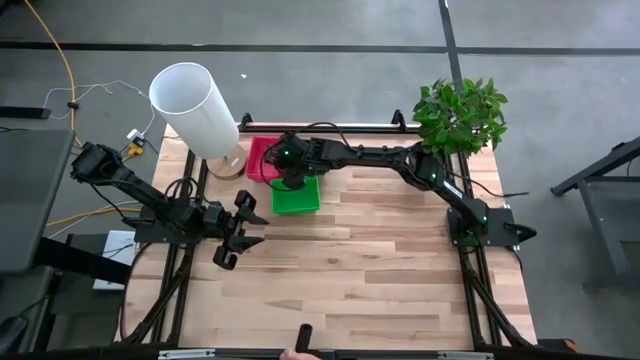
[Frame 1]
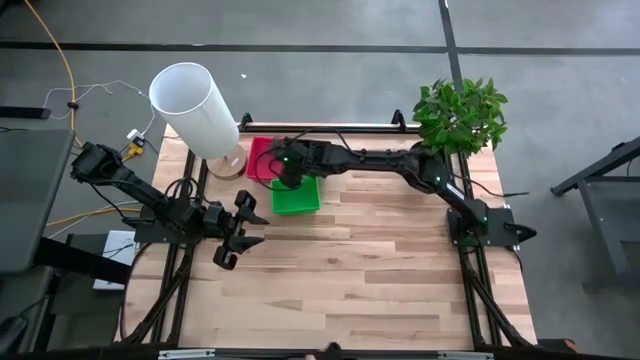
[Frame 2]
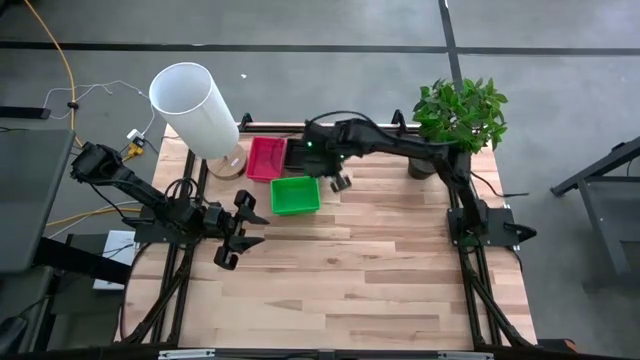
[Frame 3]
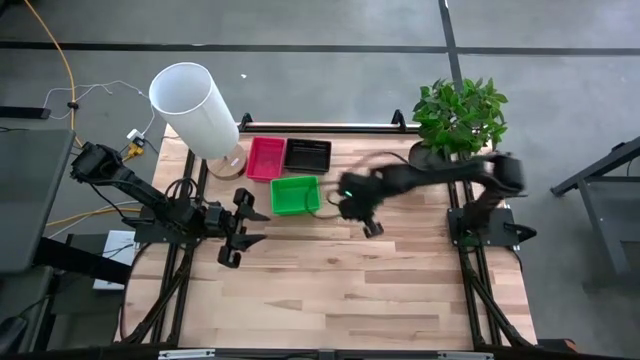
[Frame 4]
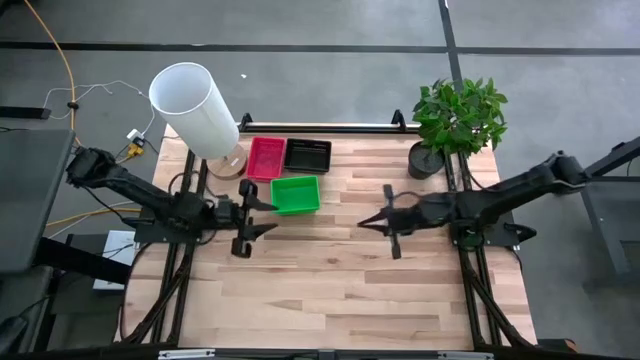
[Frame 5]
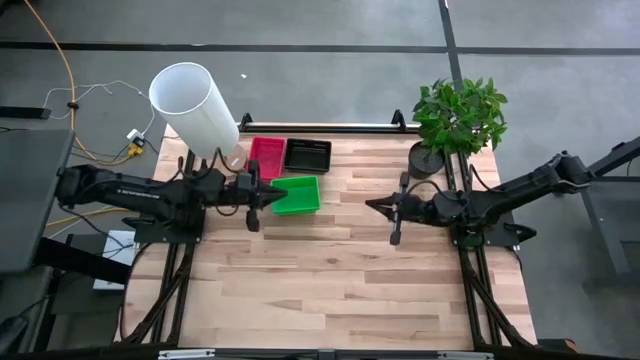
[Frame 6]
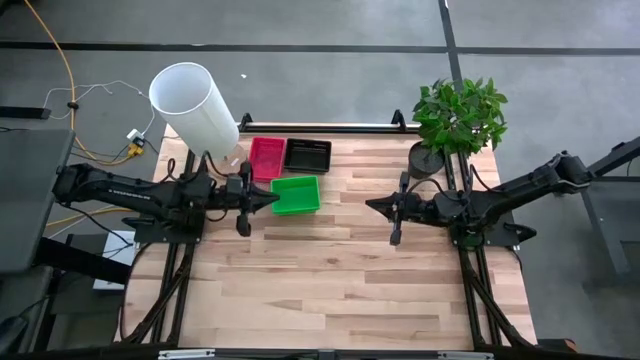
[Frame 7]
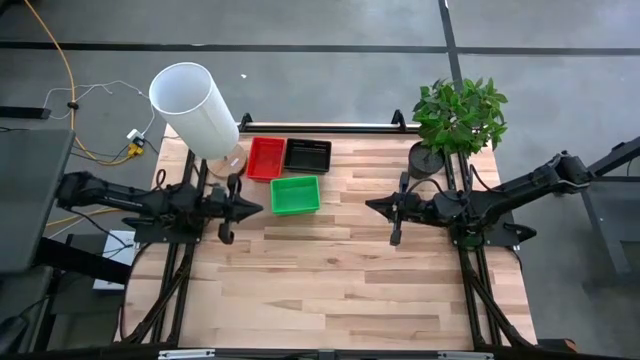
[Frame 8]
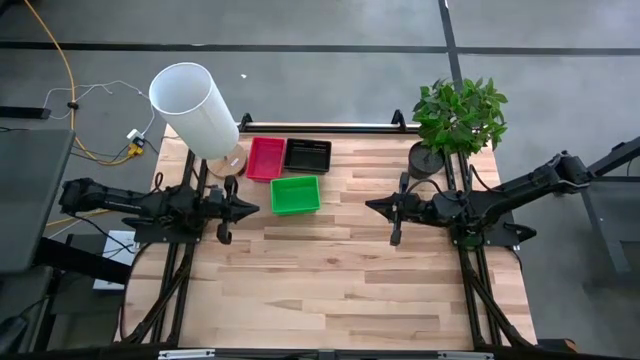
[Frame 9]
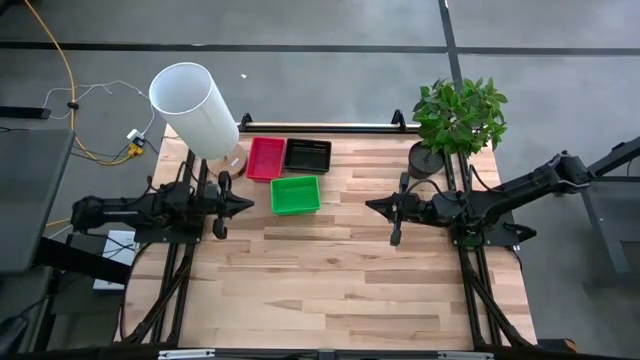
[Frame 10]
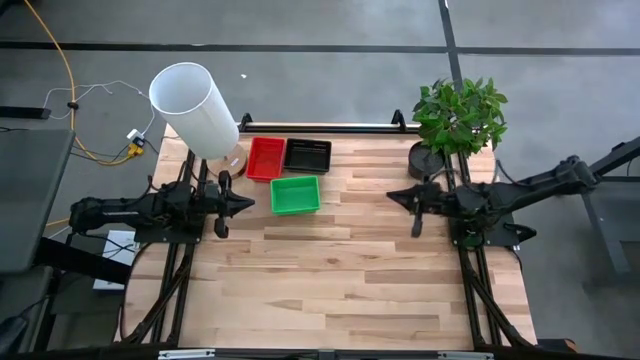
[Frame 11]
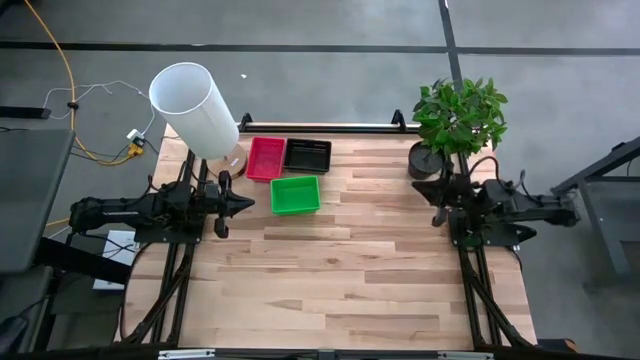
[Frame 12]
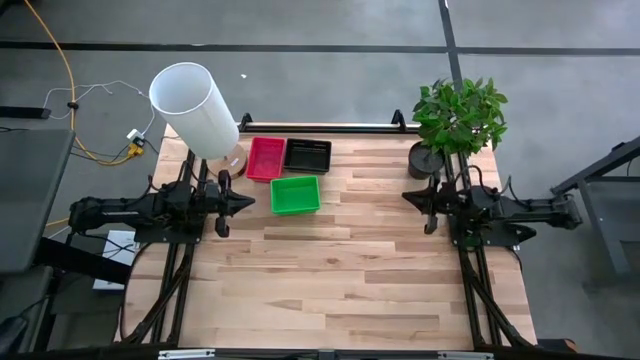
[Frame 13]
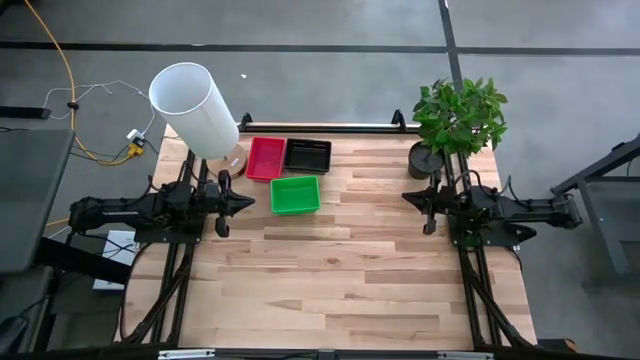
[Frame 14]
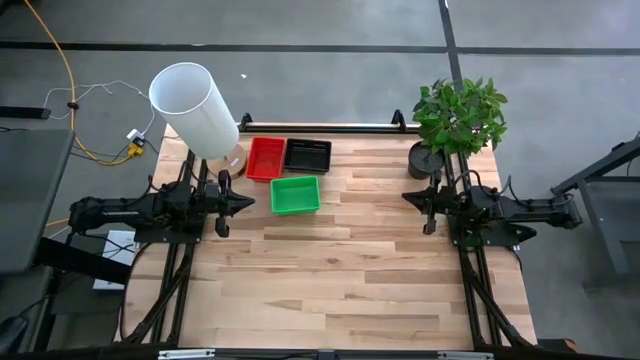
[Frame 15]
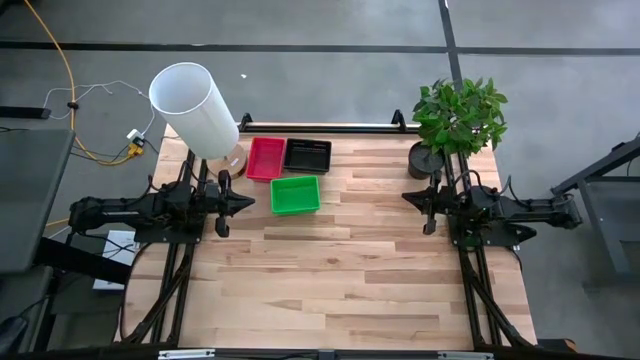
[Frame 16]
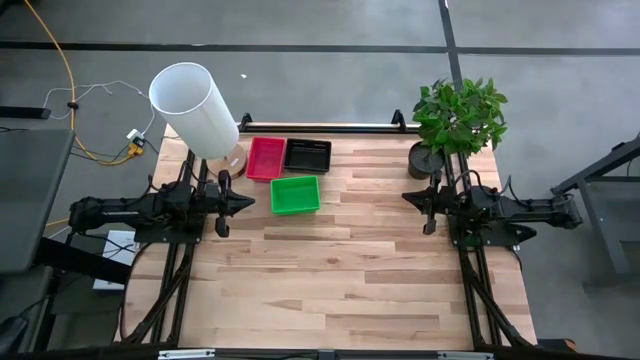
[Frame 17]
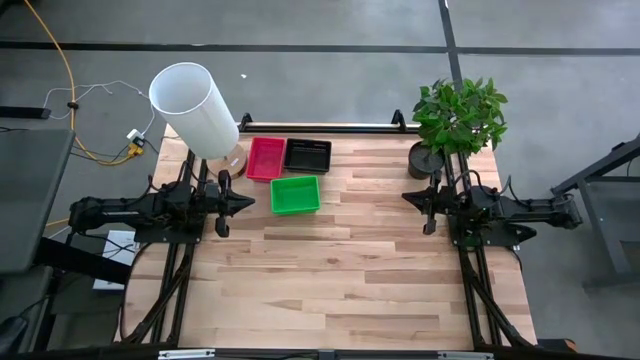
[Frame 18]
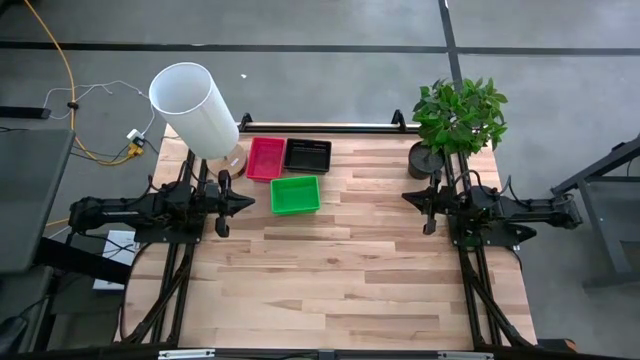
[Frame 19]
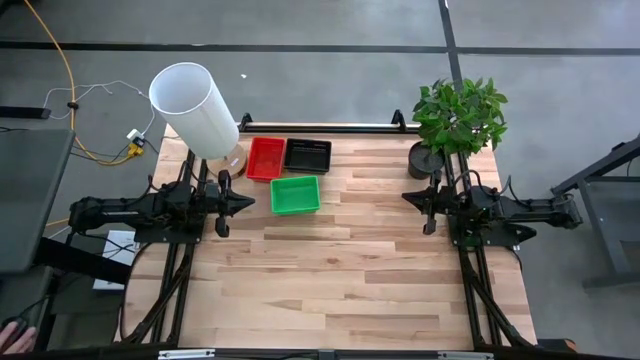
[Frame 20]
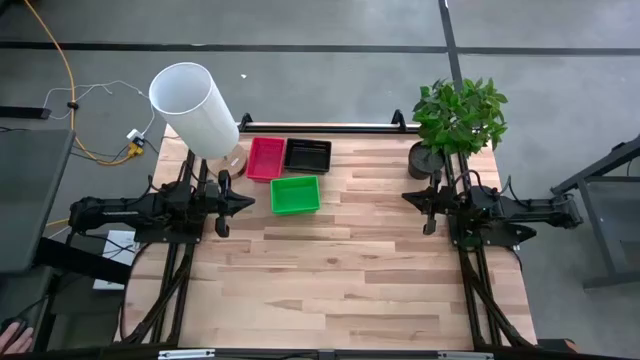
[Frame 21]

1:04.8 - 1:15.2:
Return to Home Position

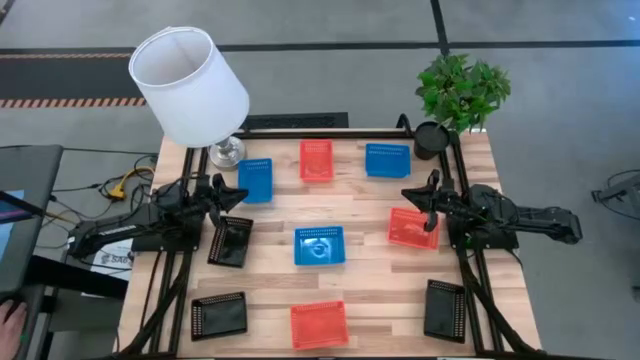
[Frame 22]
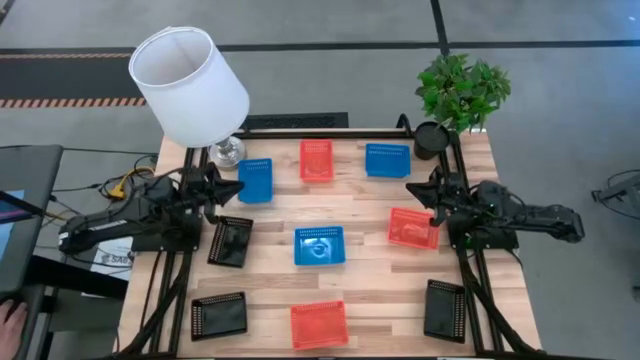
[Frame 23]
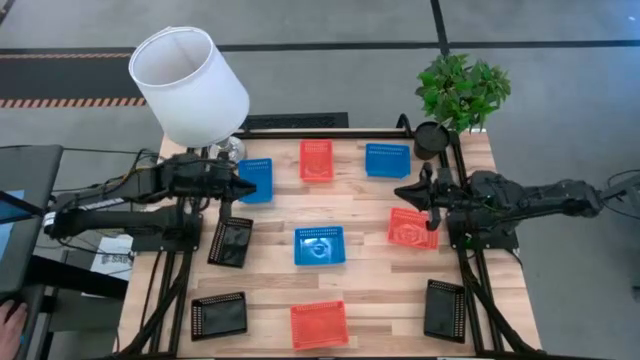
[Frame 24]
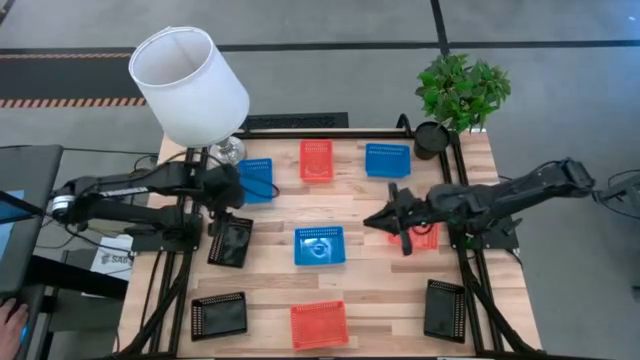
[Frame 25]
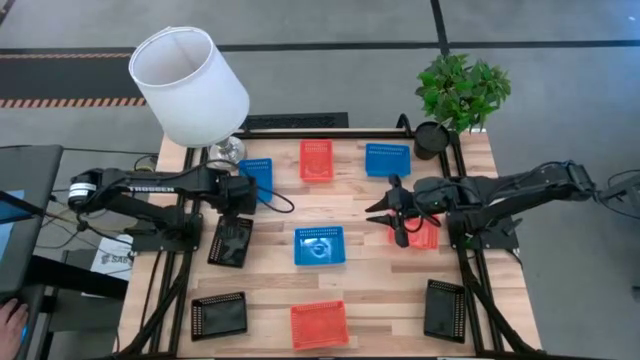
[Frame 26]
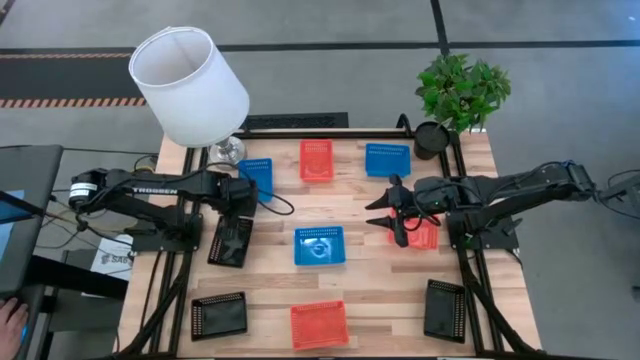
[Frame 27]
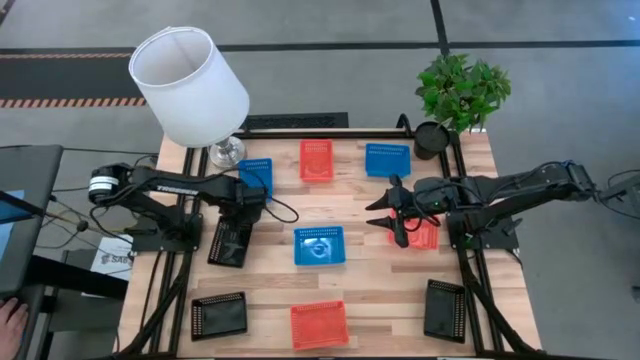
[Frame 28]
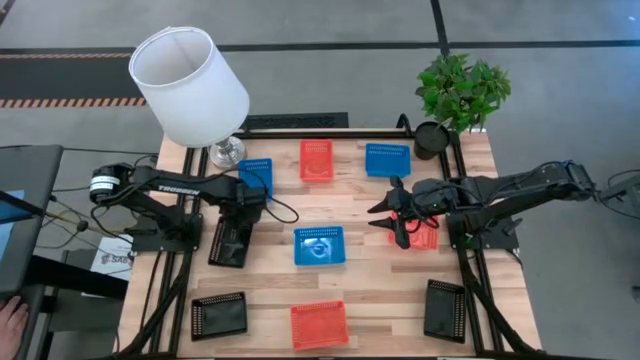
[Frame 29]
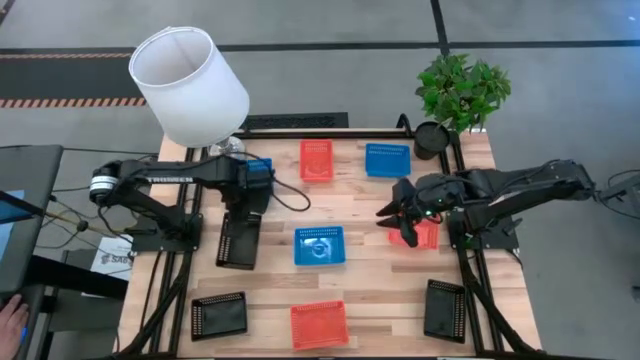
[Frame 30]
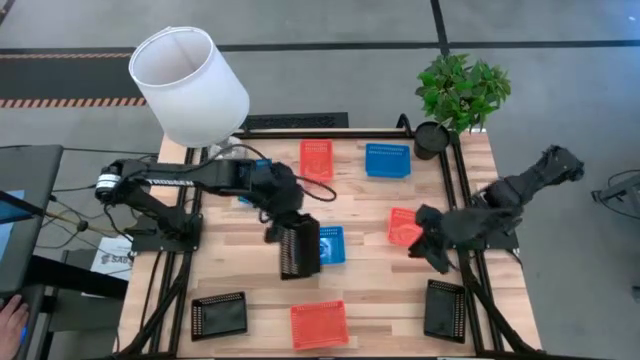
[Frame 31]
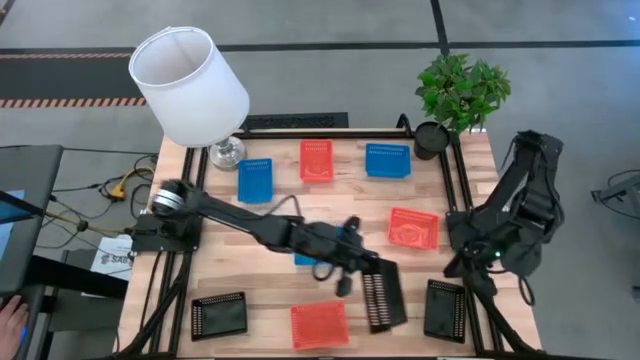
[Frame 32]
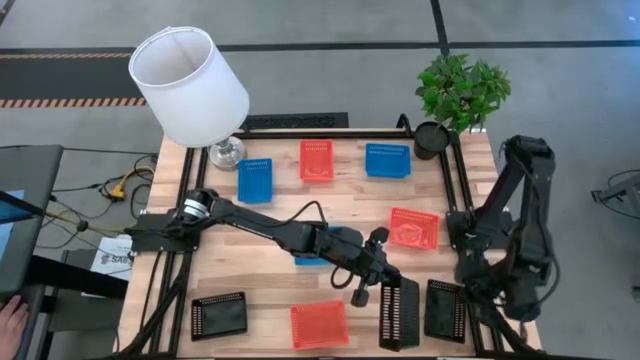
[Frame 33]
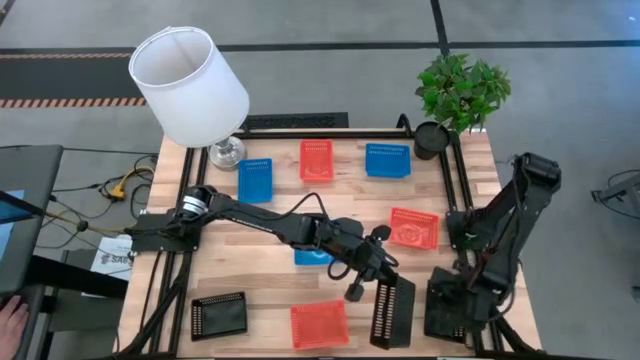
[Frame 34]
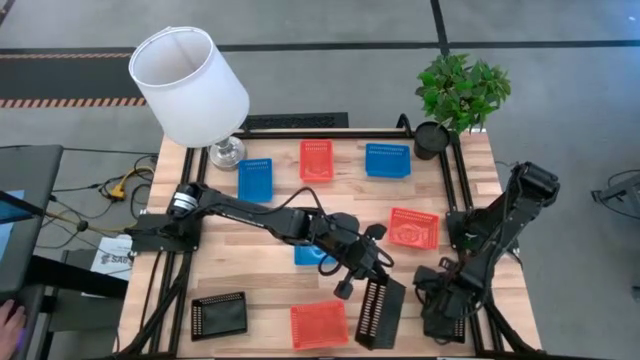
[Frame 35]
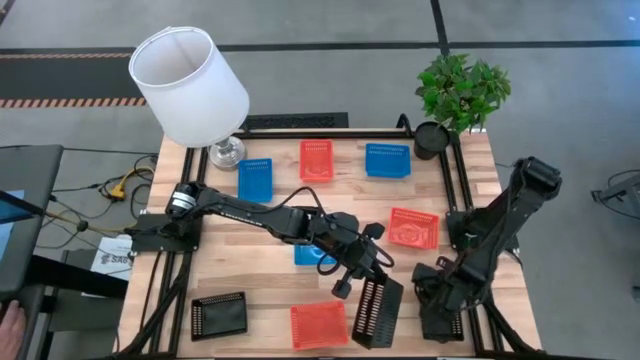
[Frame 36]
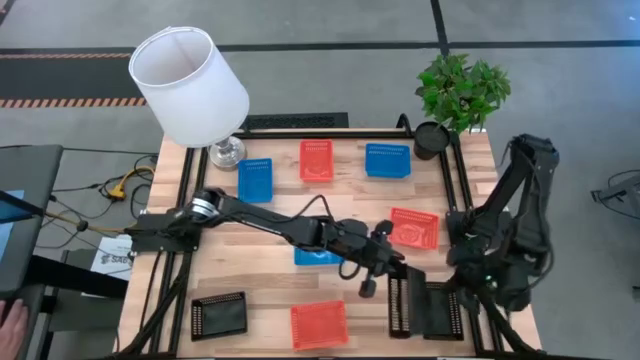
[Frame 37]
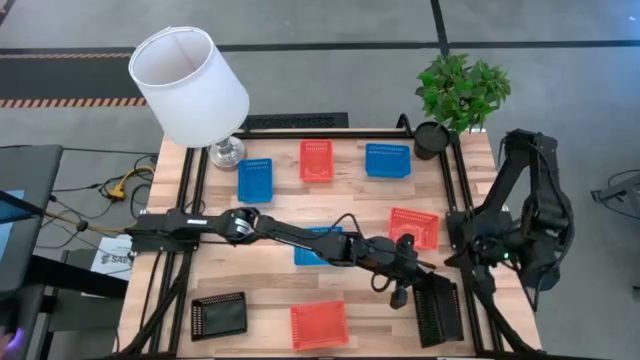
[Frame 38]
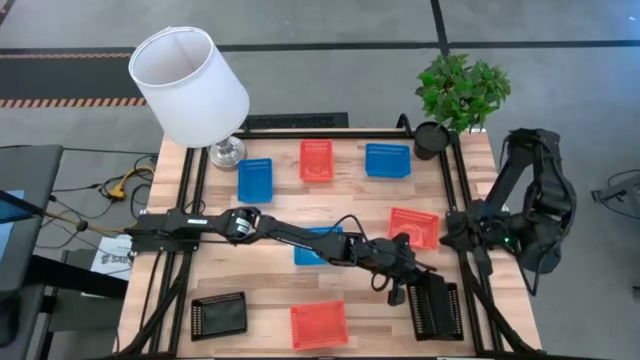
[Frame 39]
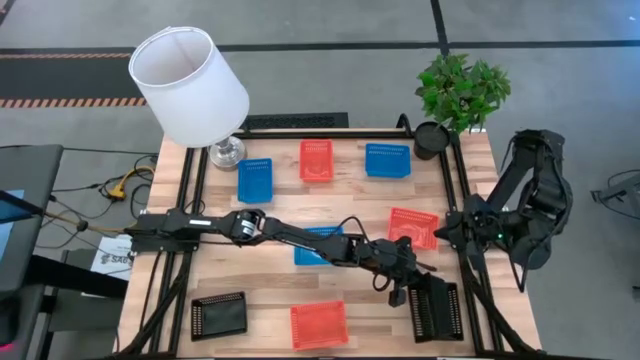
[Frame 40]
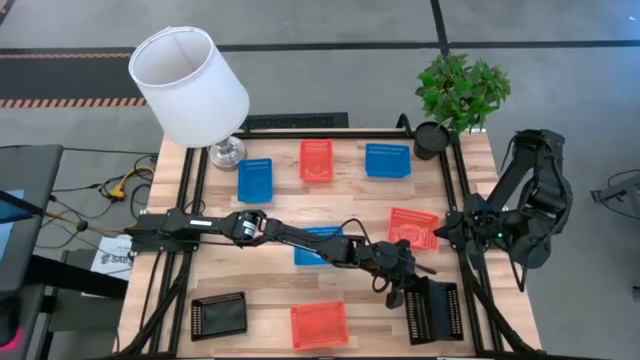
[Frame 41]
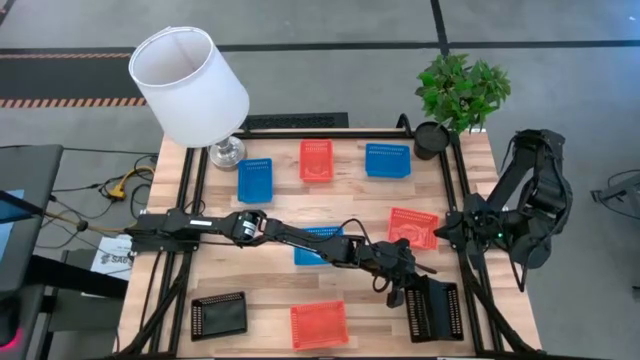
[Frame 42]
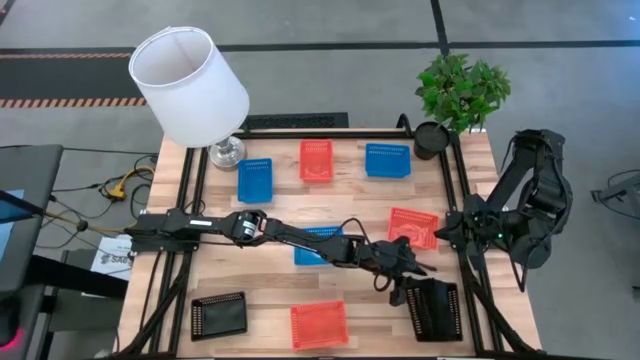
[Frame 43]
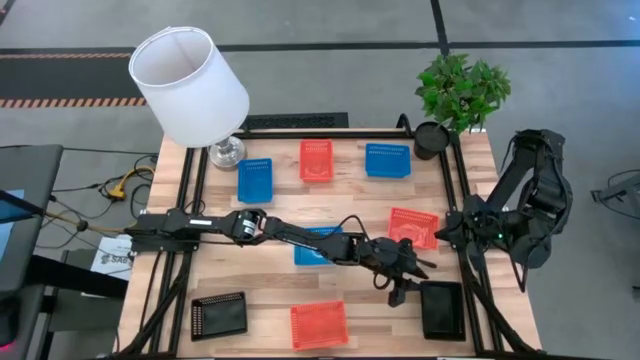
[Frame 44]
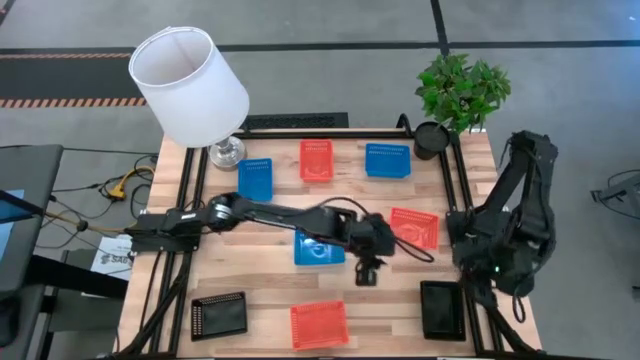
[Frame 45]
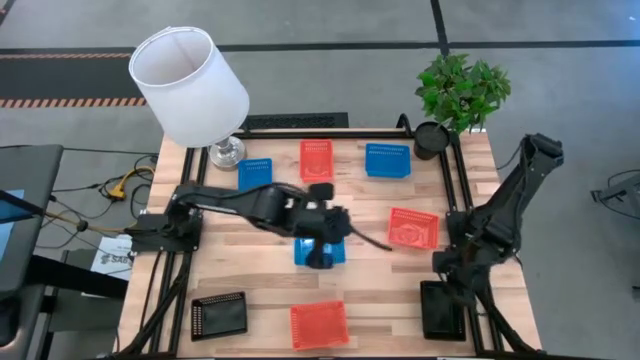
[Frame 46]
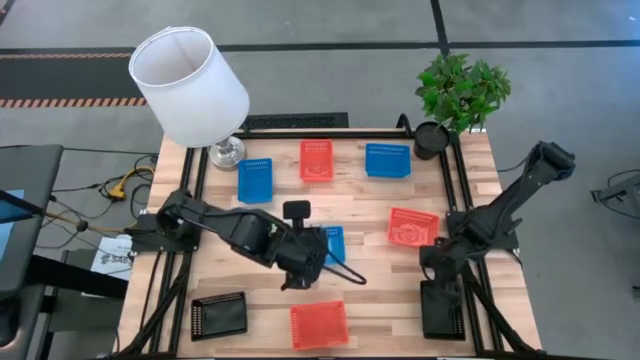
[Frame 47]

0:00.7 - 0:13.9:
Stack the top left black bin on top of the bottom right black bin
